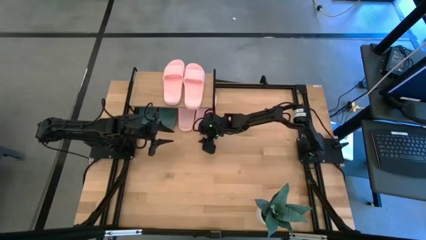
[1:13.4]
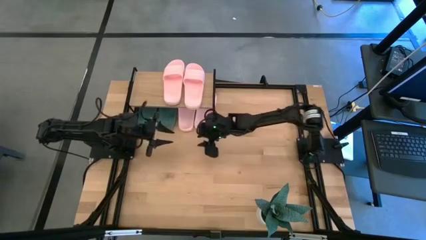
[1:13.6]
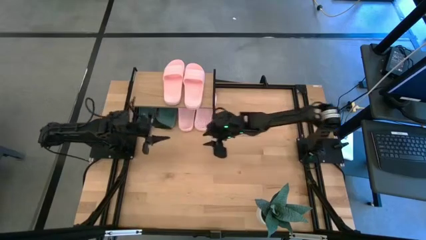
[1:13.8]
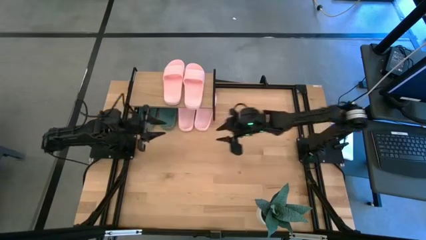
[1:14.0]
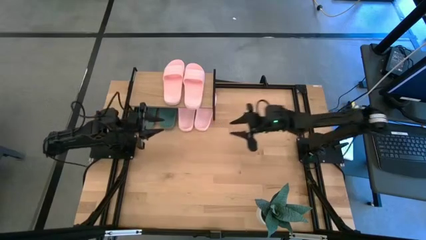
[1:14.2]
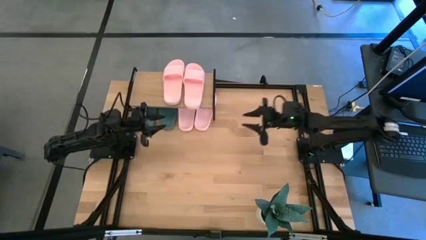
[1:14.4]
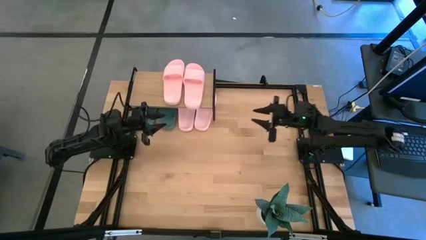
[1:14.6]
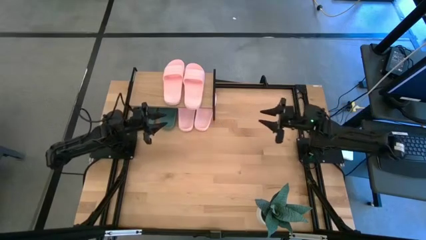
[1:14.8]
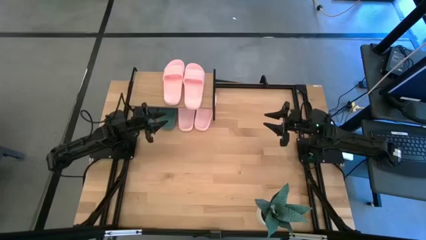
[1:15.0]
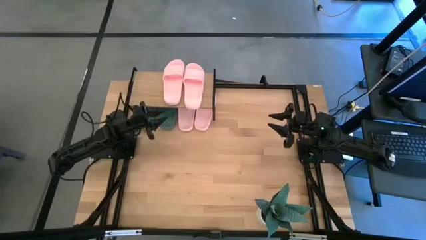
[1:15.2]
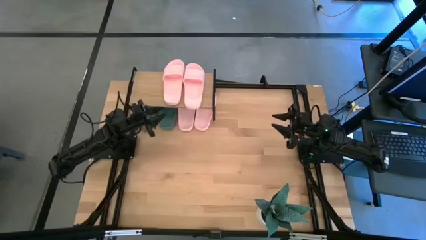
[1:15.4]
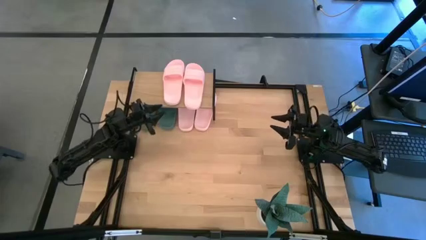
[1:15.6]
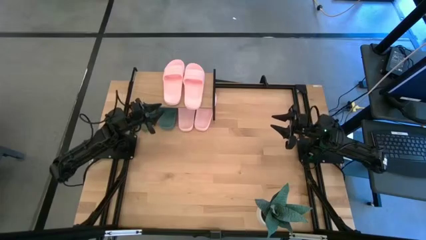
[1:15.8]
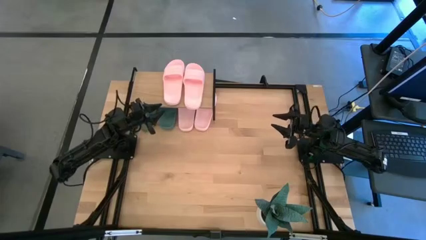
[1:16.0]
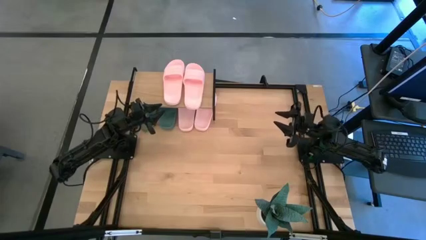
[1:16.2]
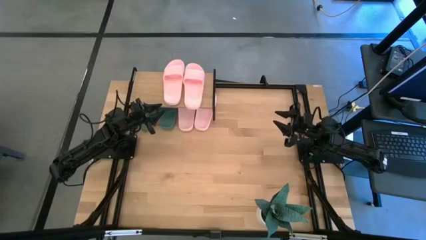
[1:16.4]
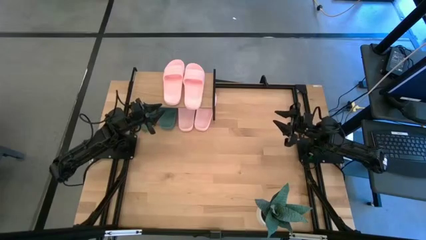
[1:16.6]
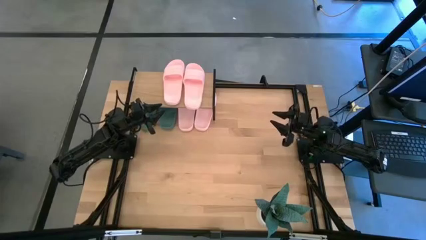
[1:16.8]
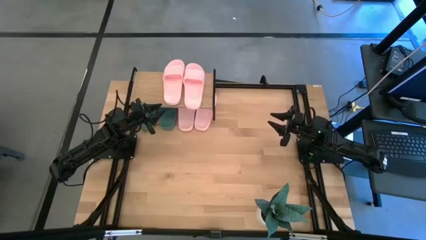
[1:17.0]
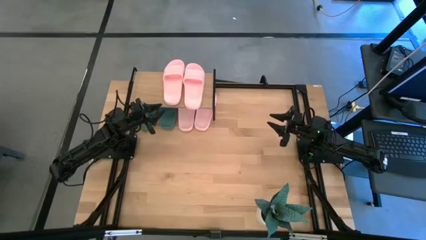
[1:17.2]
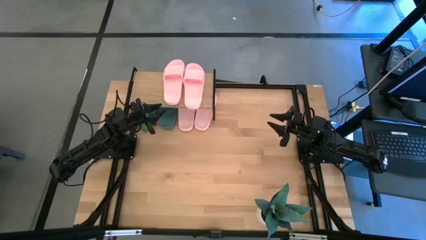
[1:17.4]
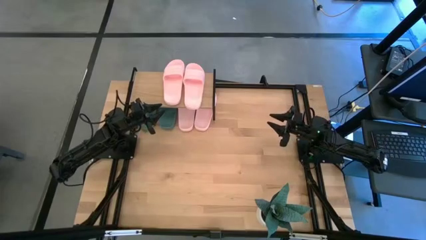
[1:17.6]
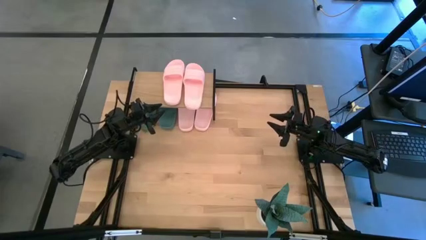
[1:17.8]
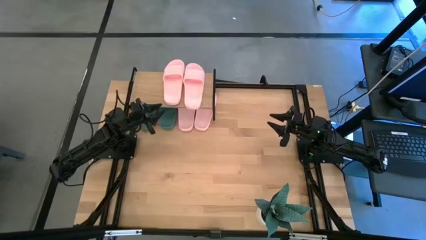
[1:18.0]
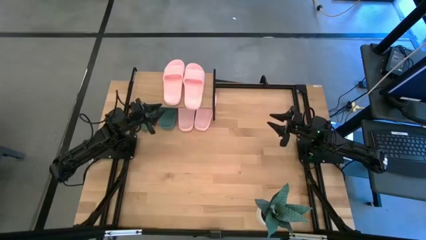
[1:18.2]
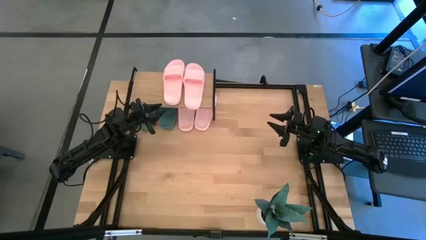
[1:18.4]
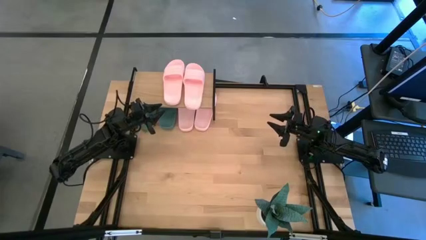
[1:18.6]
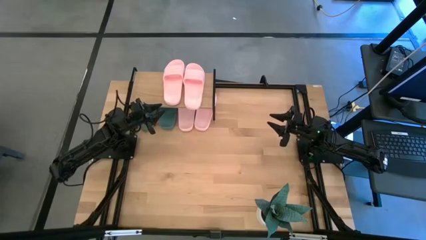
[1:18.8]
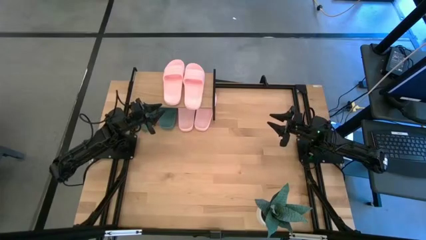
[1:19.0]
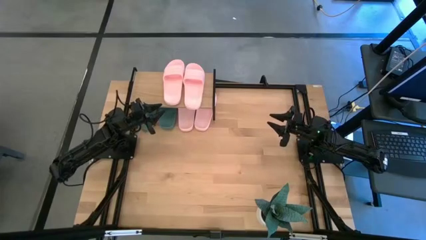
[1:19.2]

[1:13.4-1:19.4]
Task: Pick and place slides into the shelf
Return to Home Position

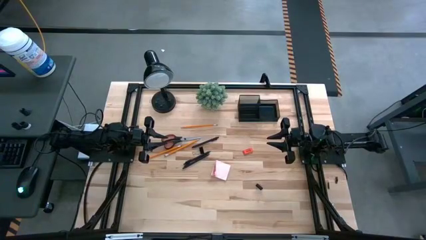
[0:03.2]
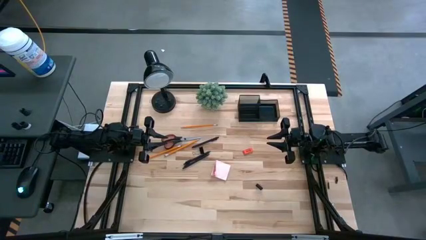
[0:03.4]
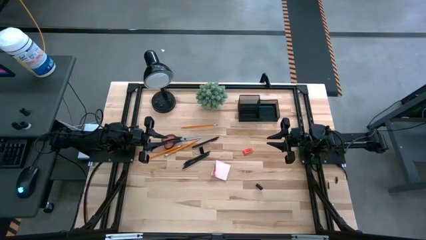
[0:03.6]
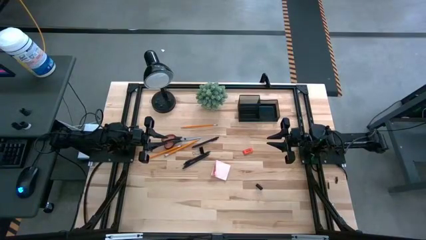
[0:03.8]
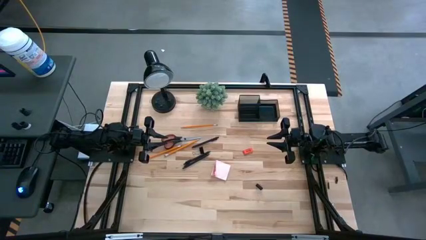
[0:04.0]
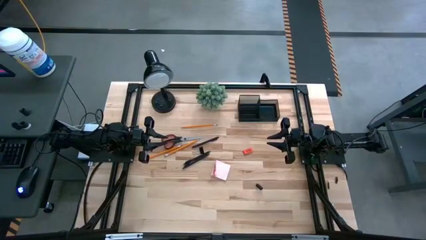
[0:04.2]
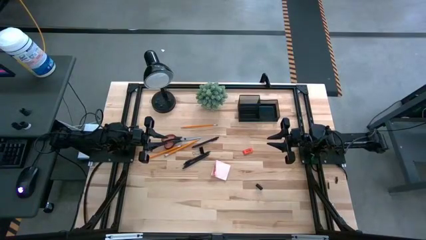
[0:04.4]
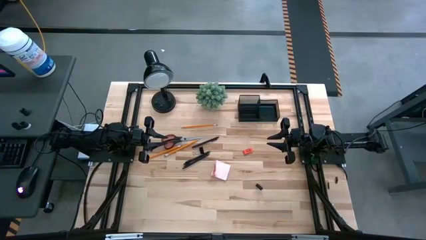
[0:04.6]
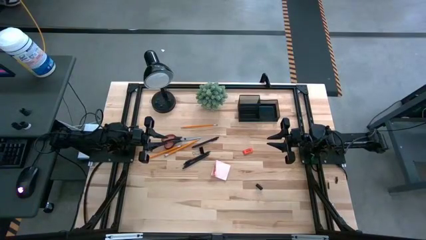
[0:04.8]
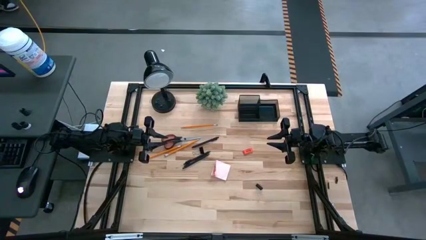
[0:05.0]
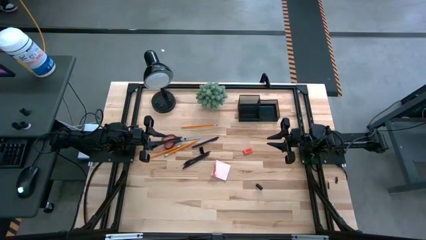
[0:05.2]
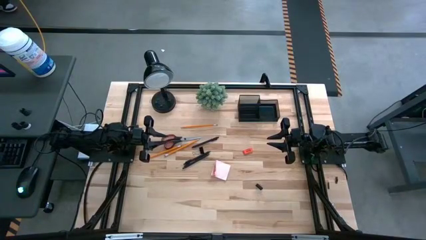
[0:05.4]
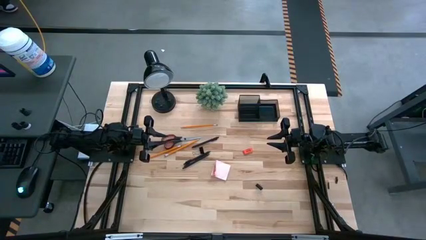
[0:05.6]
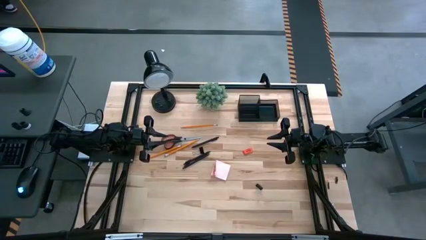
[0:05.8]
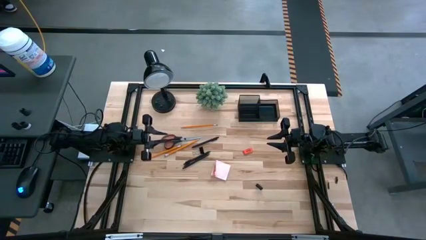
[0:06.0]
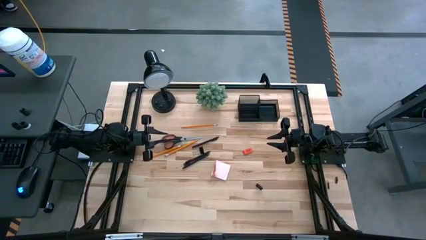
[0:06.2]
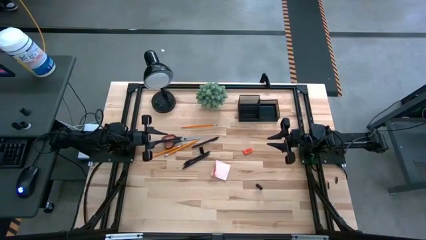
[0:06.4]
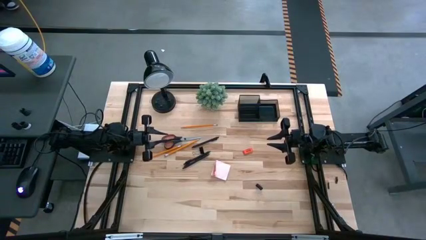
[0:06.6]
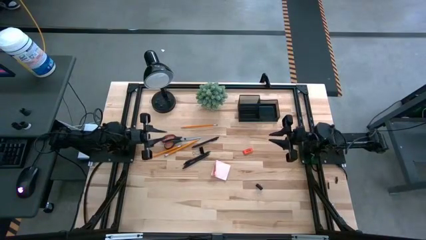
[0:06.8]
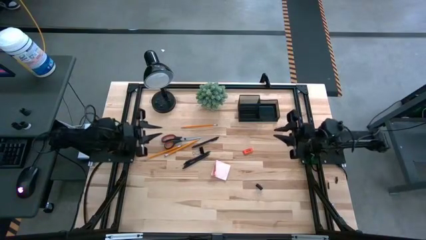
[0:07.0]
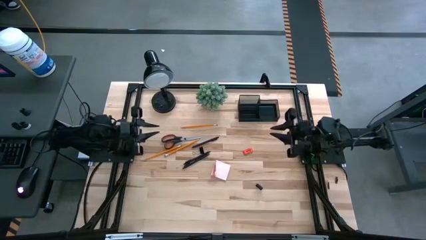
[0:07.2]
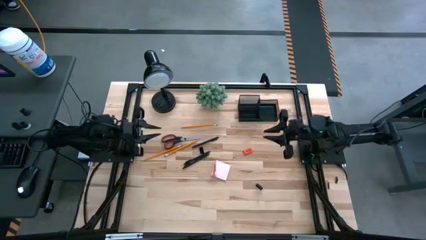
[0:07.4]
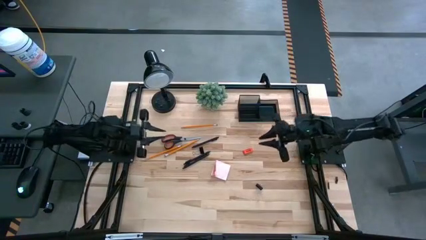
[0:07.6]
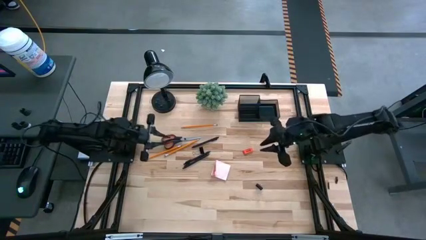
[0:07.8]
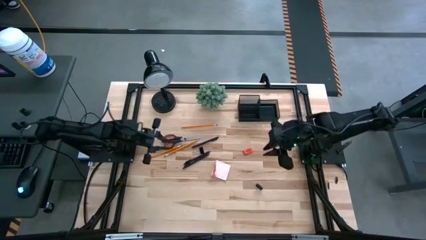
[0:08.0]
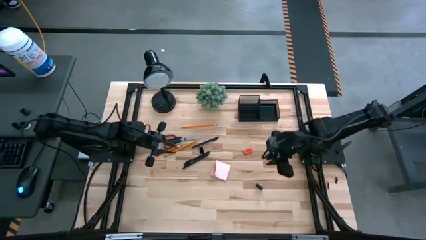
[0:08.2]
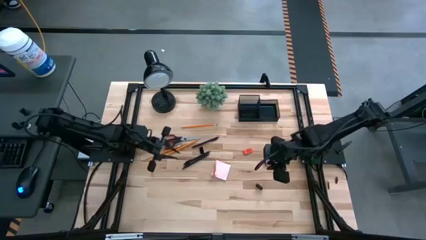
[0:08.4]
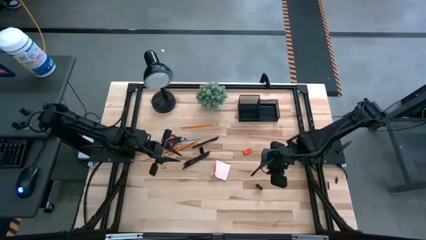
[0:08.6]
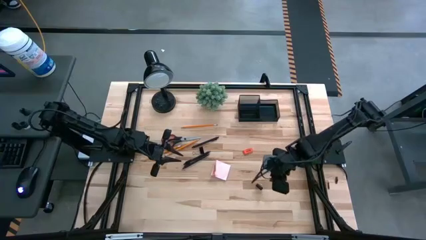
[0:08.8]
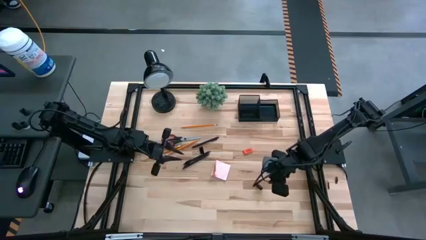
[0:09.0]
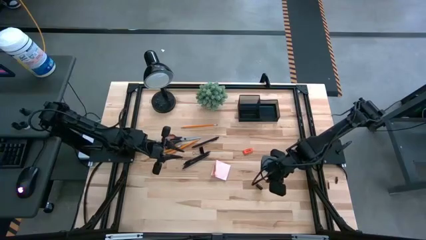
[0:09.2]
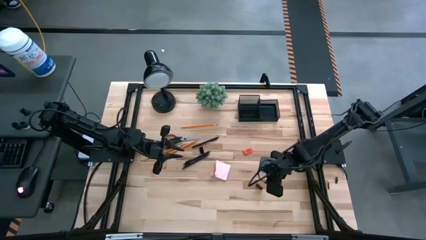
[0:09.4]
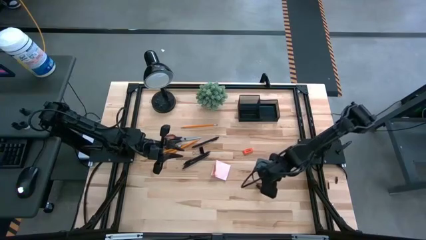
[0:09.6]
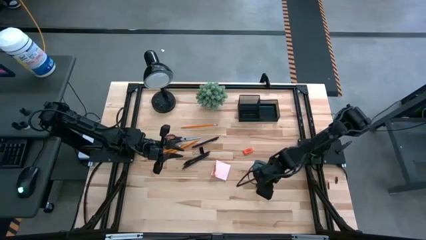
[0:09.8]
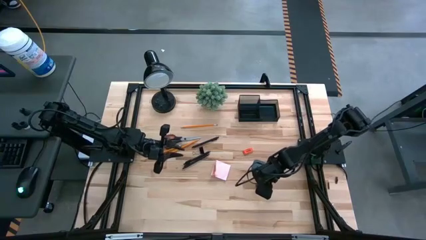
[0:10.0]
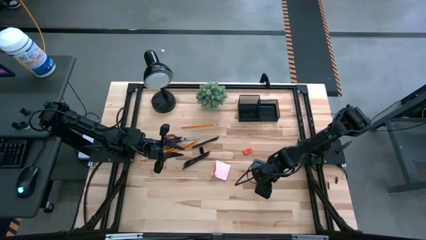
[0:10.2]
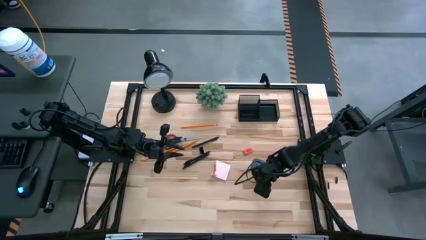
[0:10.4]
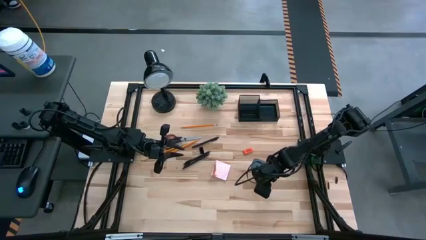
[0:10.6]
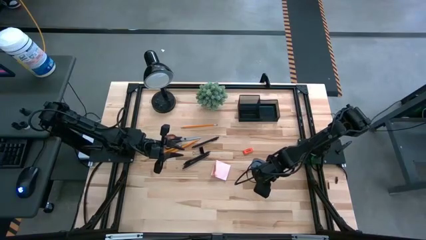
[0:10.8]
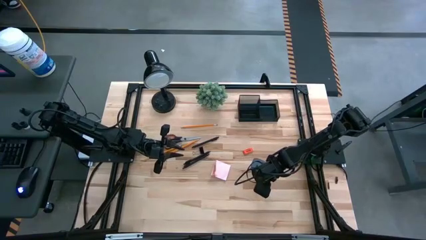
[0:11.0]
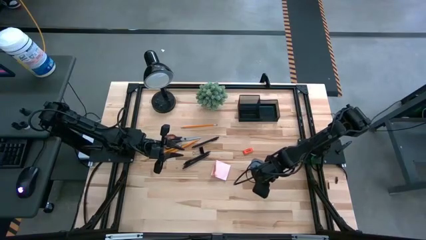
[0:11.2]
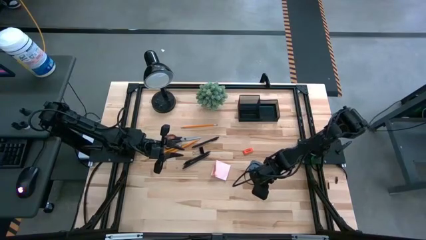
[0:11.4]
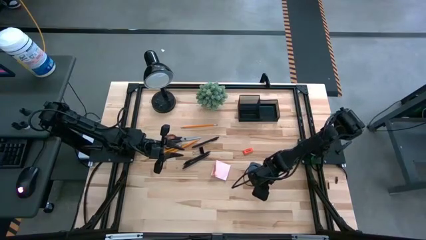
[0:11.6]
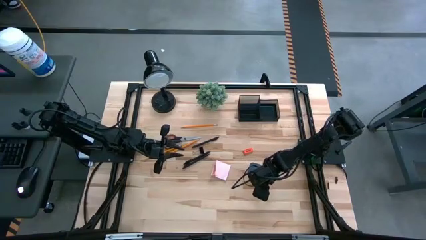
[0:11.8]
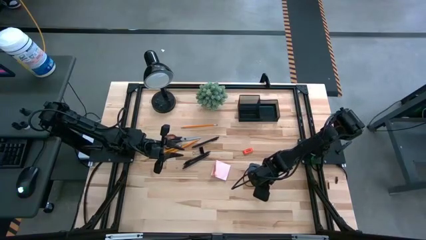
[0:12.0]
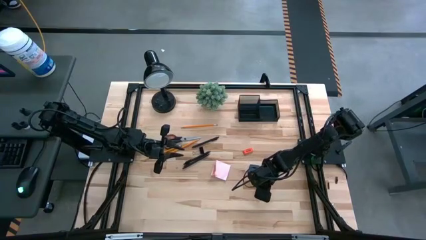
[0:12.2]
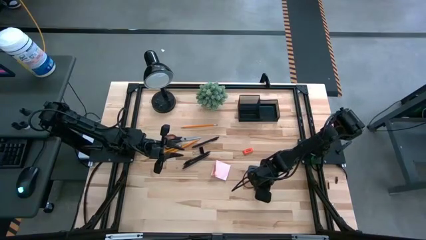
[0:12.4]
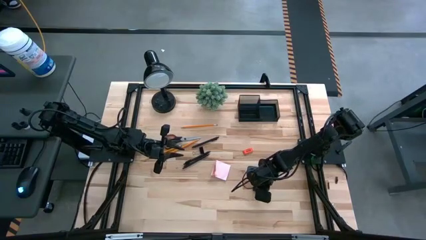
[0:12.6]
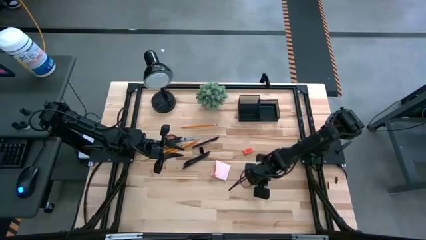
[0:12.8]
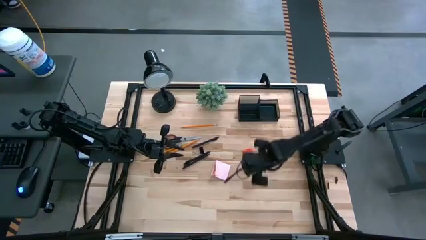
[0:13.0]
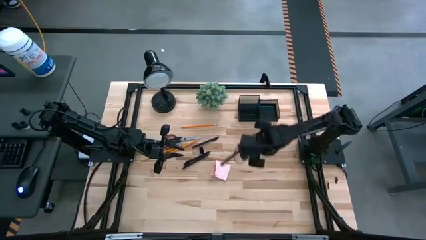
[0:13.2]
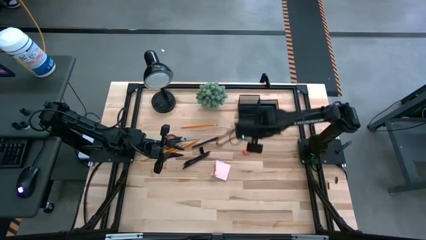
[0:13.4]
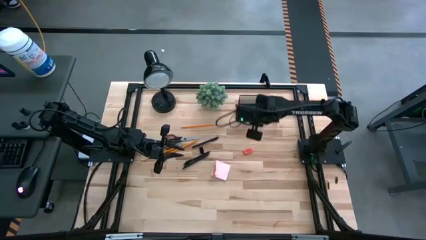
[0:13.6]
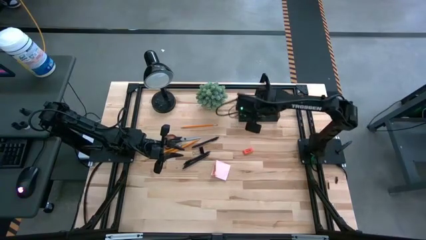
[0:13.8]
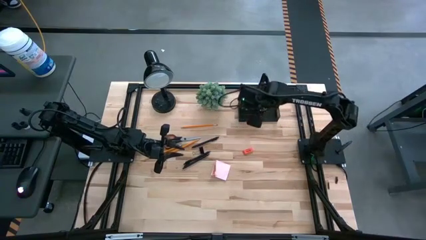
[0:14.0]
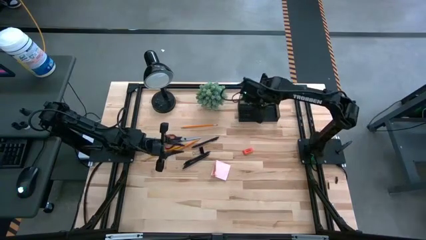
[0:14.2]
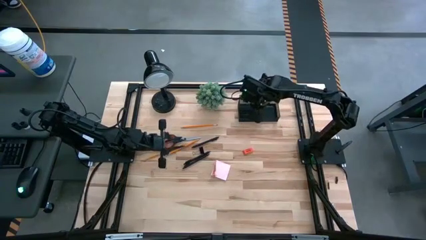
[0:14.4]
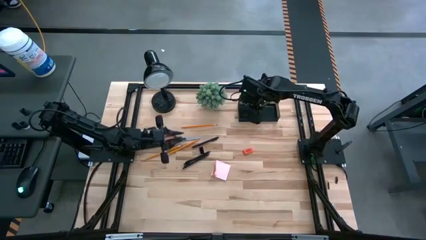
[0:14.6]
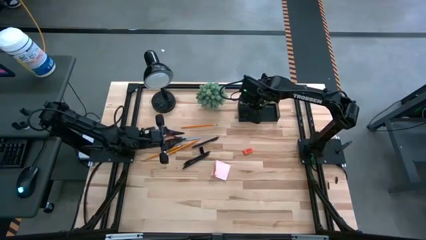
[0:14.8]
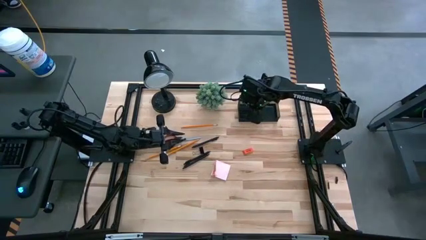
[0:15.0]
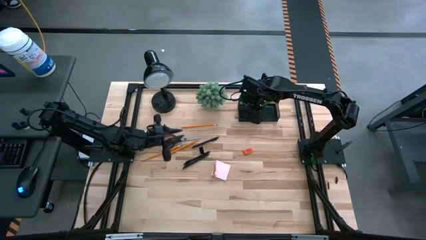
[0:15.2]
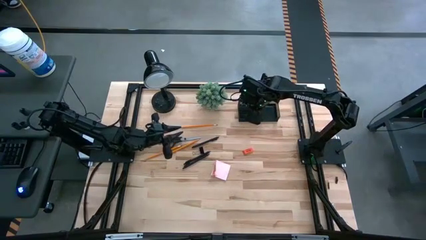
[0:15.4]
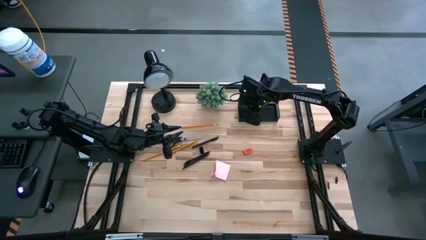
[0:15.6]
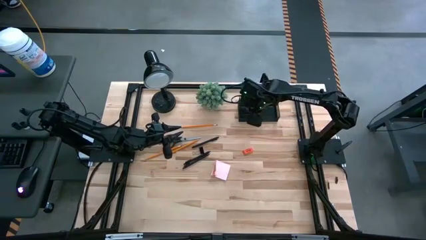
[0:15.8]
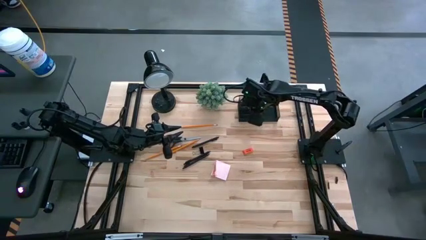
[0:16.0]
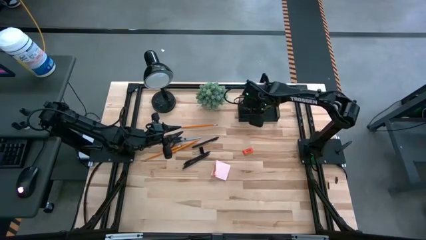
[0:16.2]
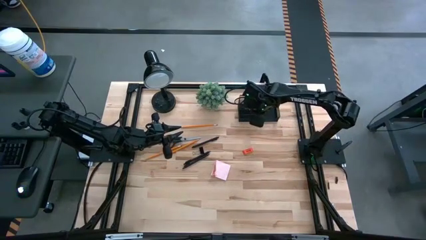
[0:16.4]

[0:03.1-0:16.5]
Task: Pick and place office supplies into organizer
Put the bottom black binder clip into the black desk organizer
